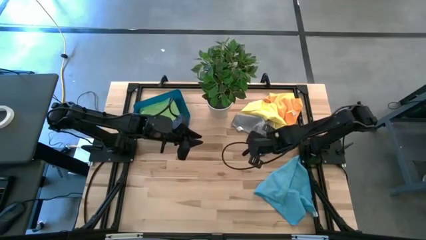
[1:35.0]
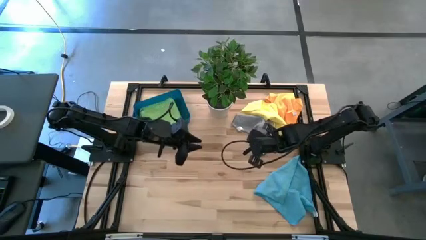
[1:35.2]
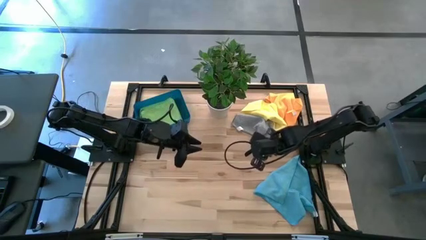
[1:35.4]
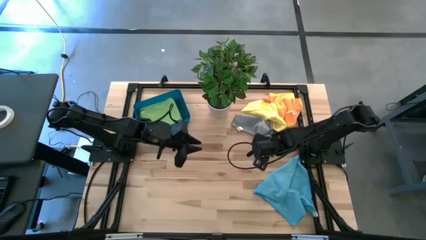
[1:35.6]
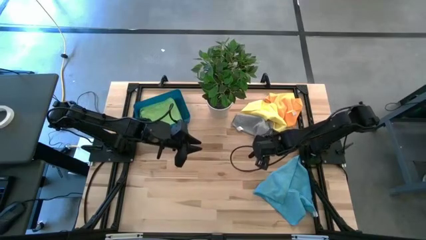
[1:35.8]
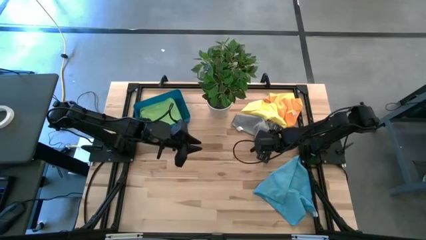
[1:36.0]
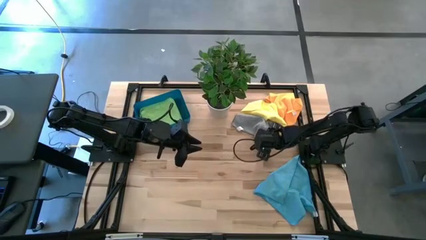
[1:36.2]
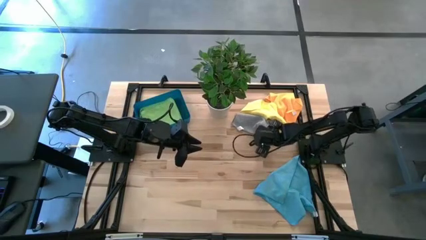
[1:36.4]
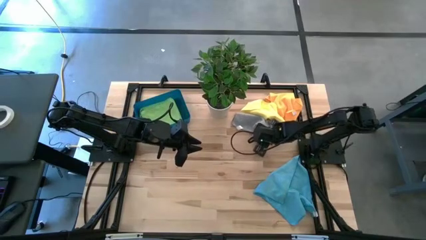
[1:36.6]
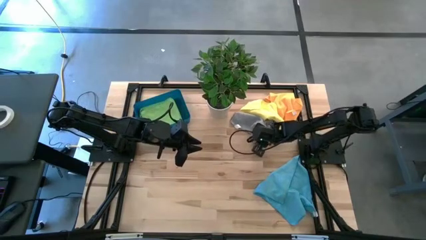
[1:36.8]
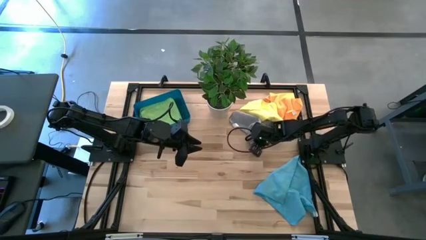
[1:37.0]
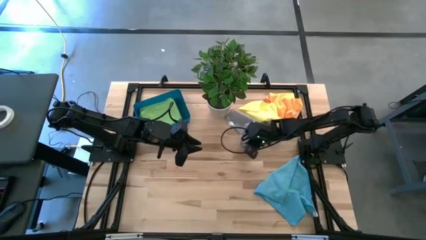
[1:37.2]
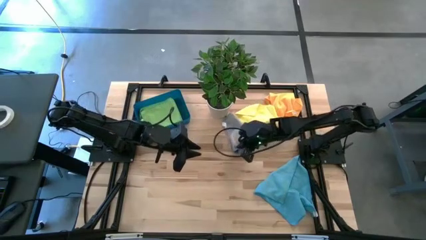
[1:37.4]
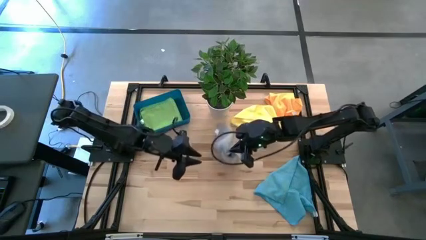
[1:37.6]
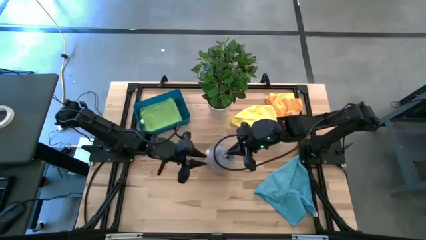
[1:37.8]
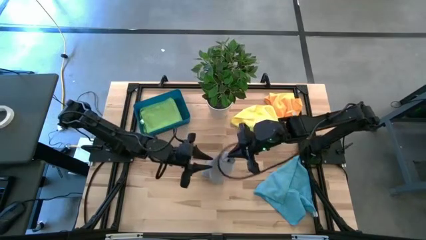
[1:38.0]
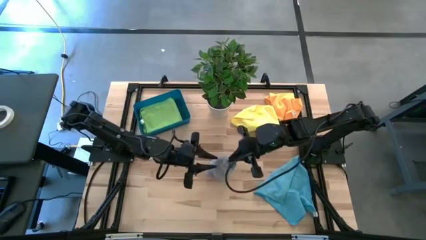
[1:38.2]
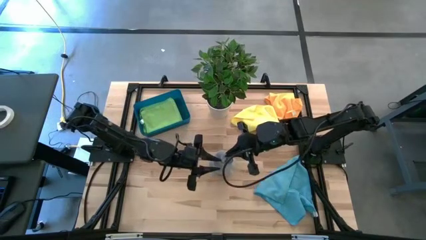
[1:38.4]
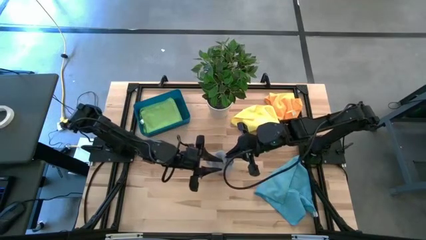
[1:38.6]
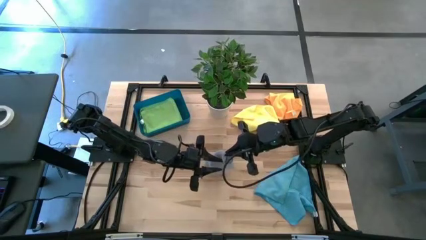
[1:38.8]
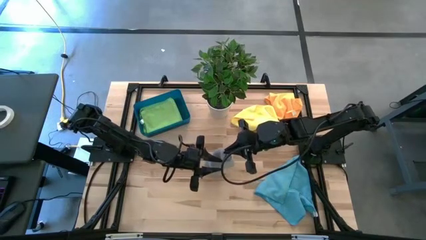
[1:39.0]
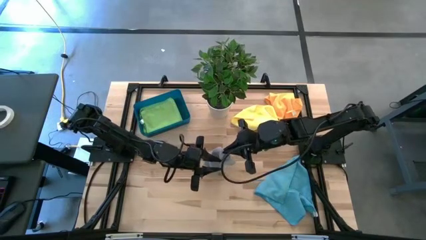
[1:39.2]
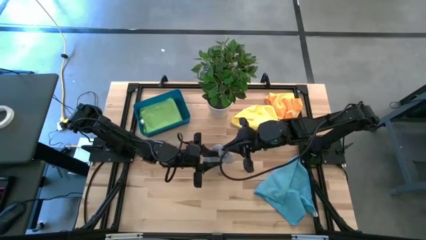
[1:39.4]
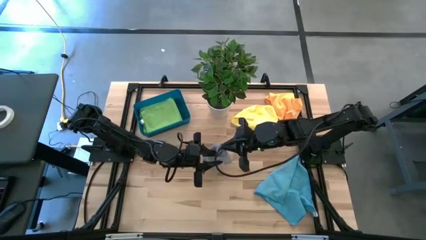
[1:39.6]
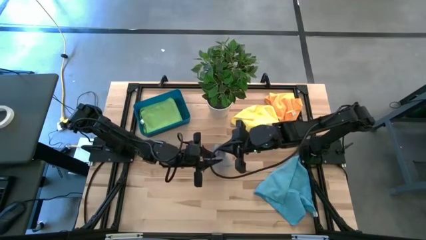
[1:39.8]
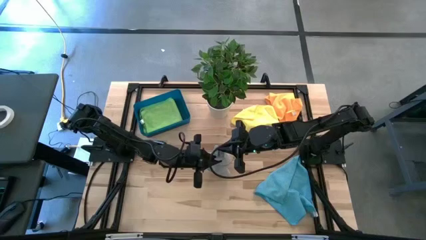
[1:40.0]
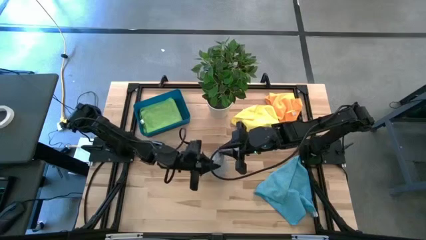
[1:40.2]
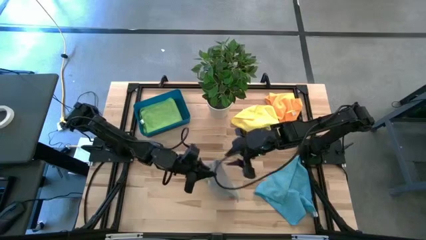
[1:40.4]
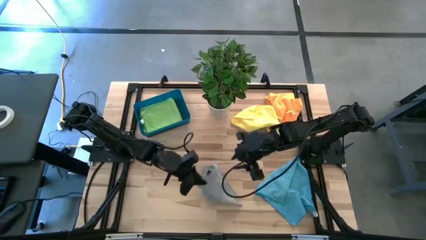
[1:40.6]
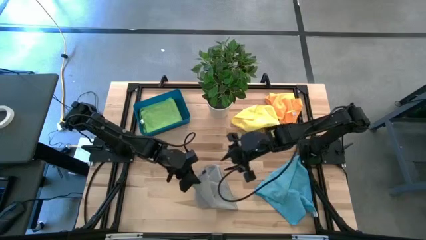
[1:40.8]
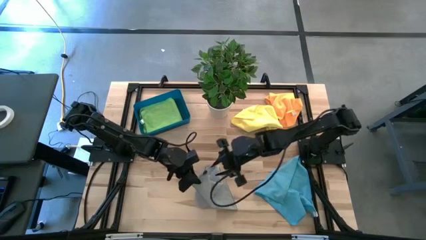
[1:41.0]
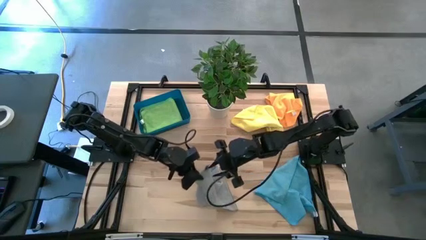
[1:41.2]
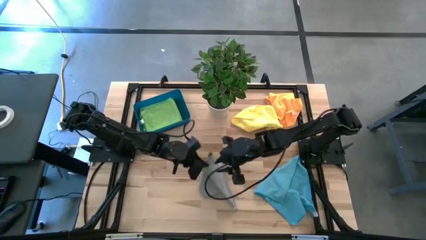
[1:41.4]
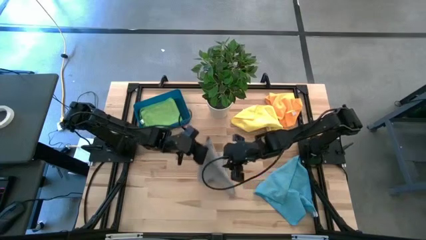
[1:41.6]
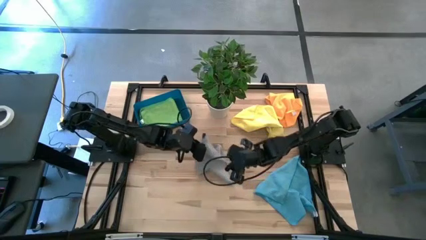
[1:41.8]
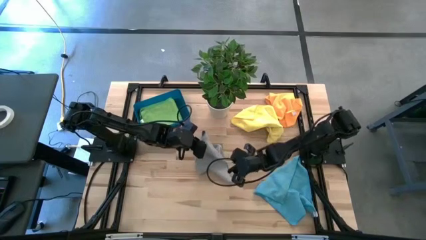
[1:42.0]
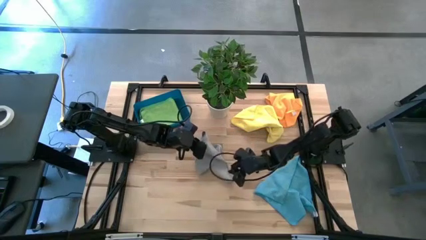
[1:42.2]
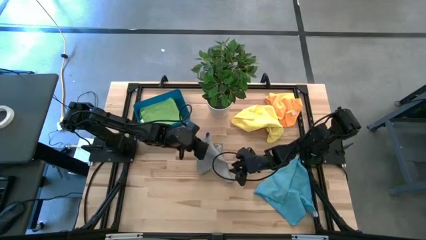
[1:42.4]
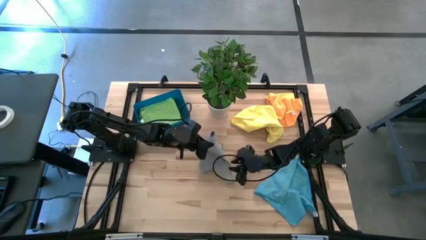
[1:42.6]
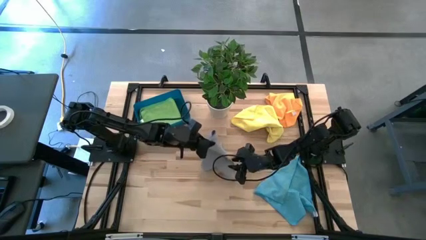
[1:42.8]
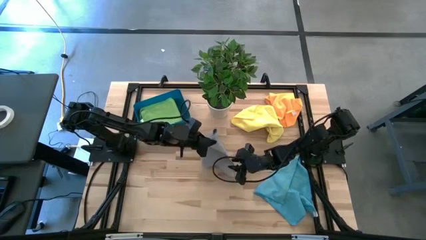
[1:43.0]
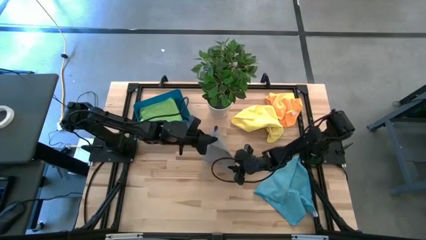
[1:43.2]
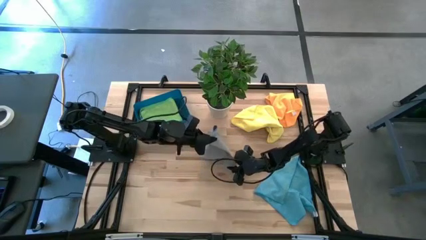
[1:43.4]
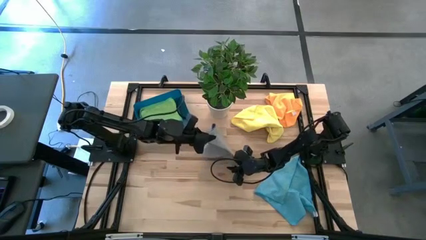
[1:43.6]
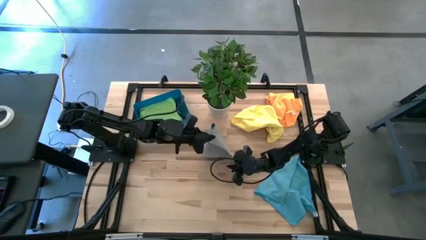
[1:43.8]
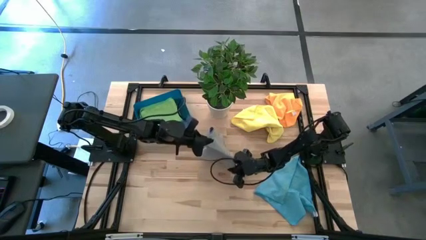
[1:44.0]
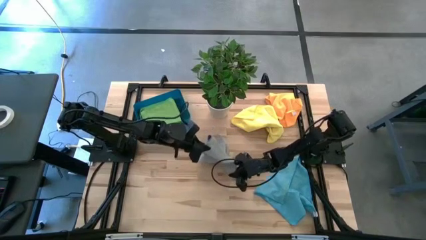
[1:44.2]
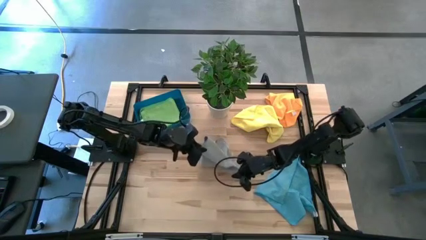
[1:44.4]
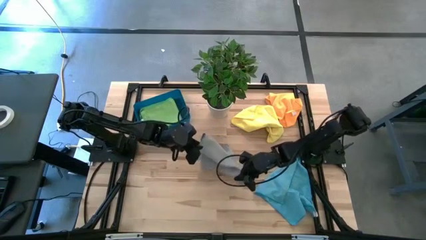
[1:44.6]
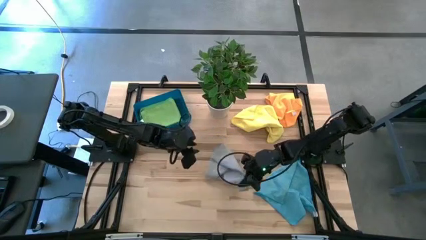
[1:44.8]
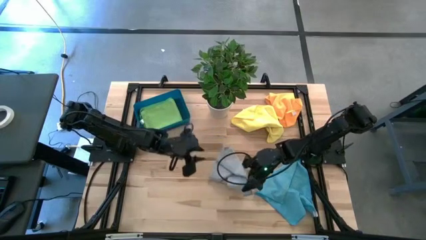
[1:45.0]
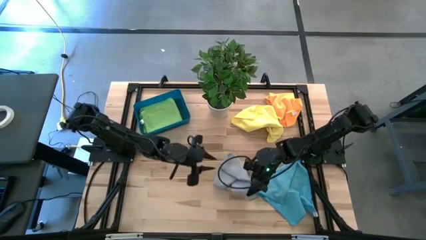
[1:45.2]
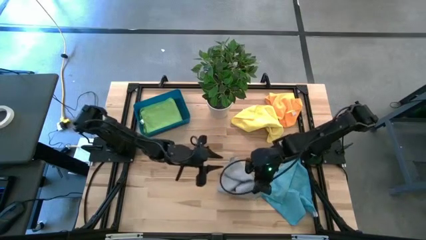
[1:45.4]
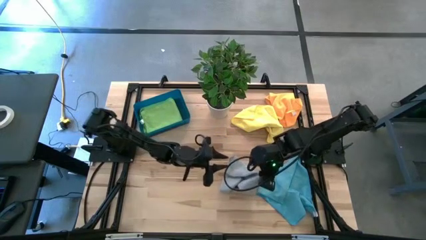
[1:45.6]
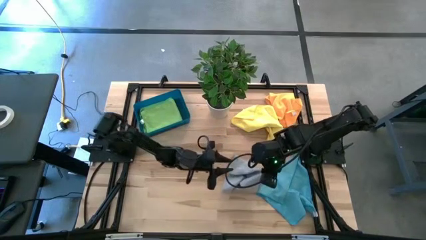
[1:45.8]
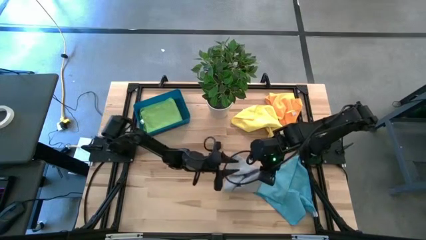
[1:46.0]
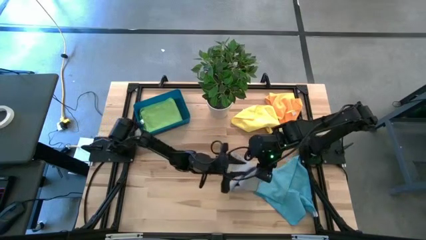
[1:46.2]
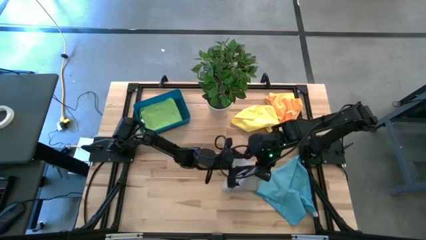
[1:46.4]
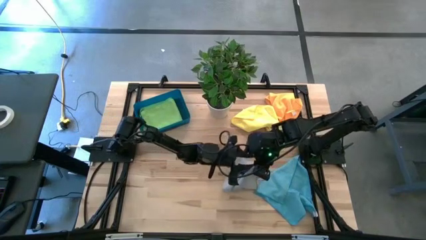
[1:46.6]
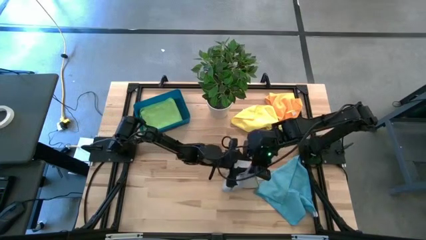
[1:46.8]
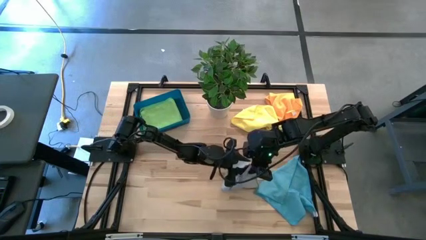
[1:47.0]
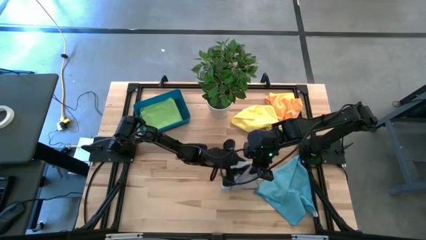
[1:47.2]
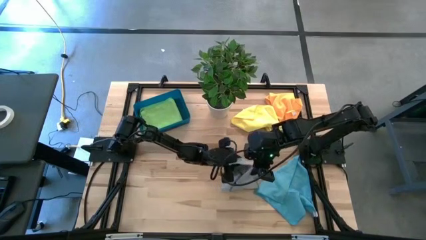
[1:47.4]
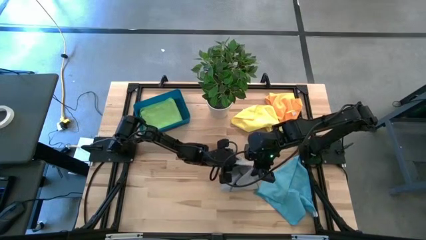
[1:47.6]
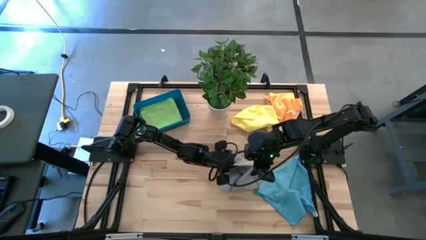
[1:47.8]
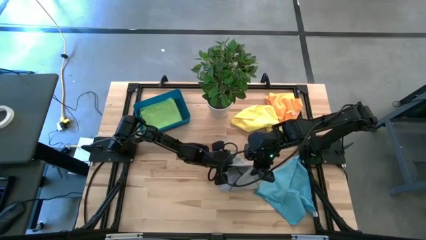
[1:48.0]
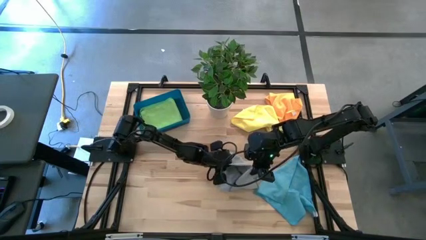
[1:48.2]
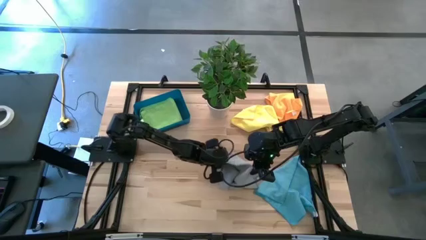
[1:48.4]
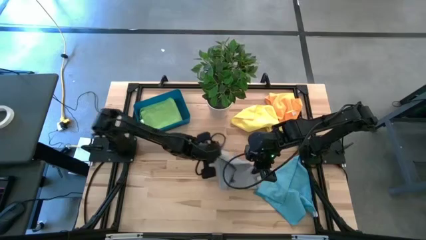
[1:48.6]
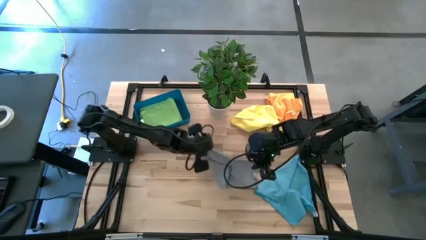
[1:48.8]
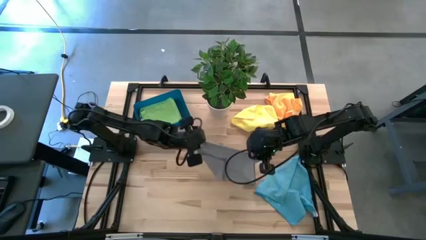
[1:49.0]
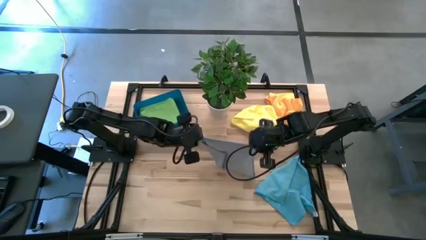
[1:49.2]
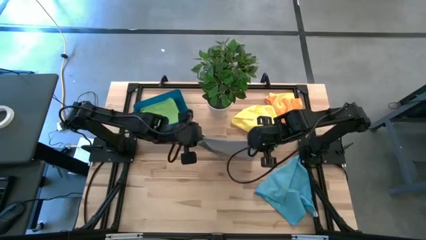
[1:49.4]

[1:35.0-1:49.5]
Task: Fold microfiber towels
Fold the gray towel
